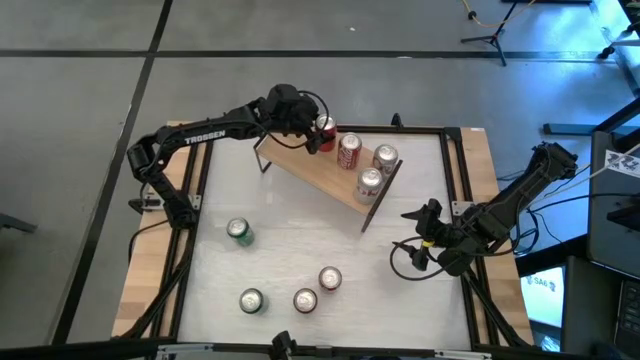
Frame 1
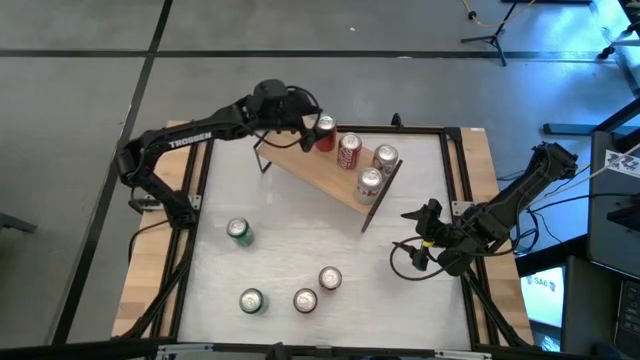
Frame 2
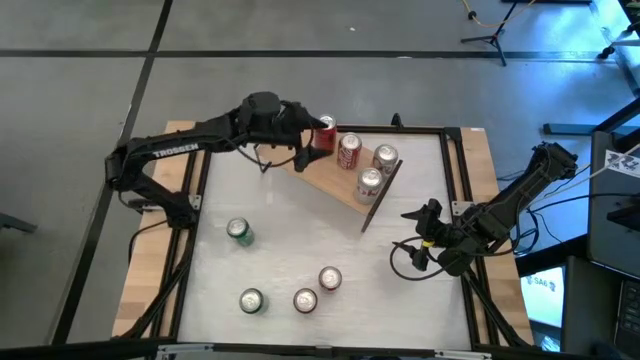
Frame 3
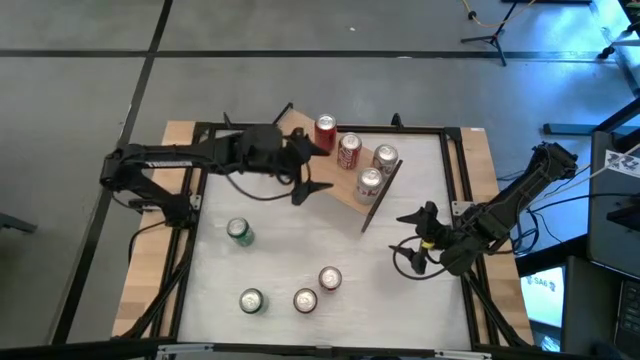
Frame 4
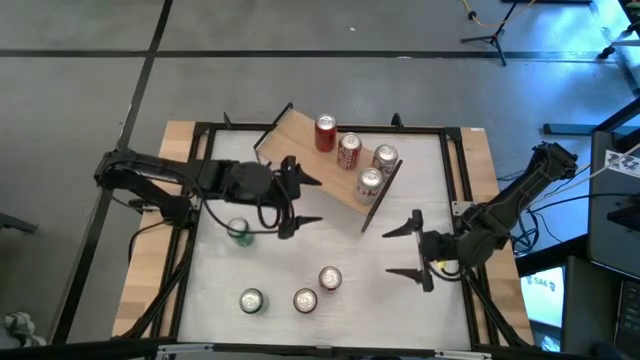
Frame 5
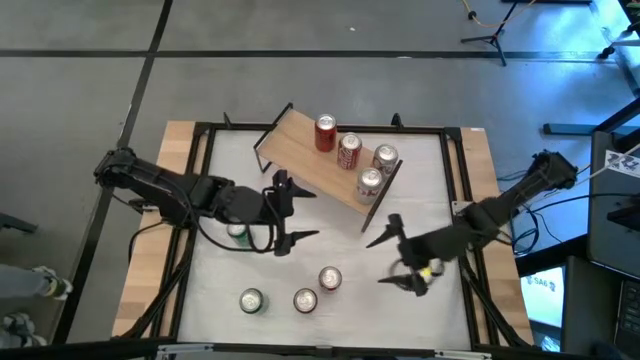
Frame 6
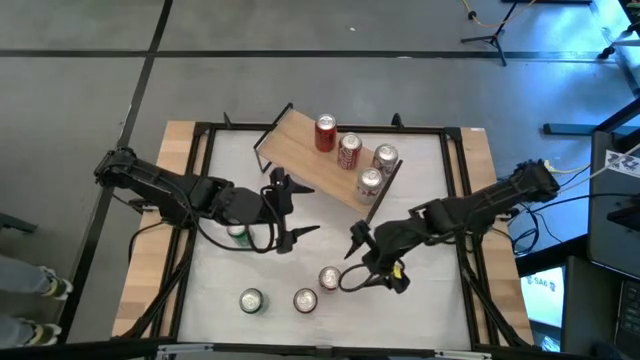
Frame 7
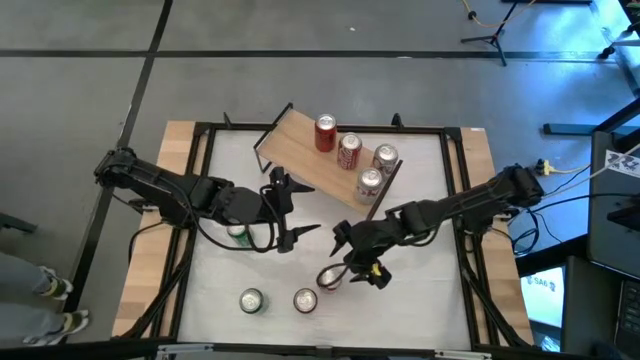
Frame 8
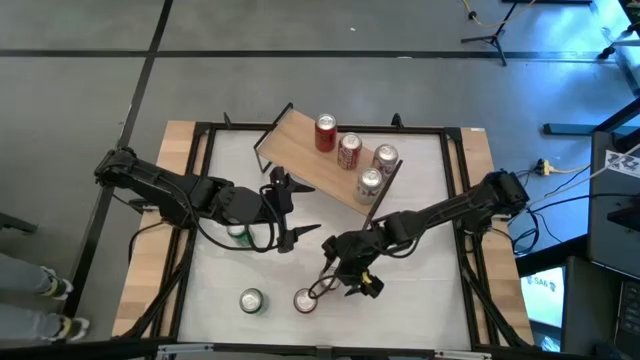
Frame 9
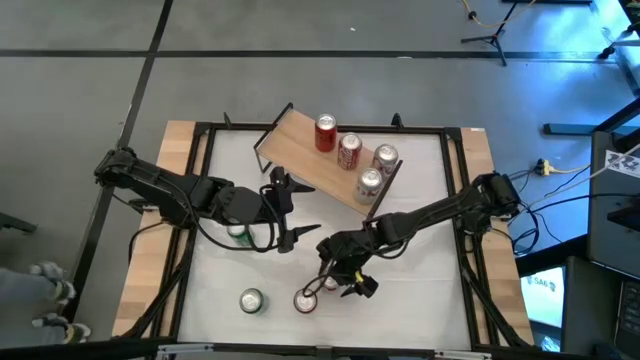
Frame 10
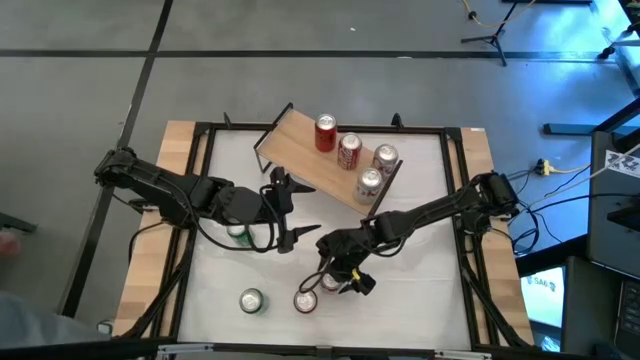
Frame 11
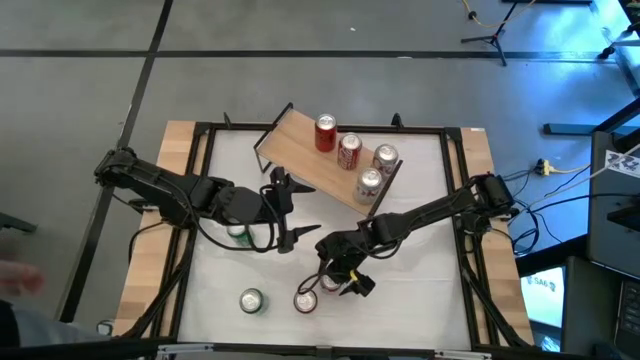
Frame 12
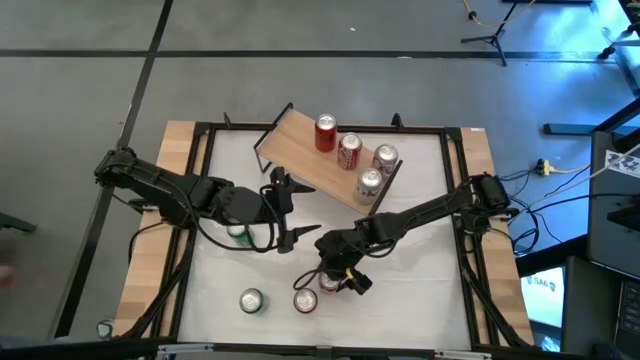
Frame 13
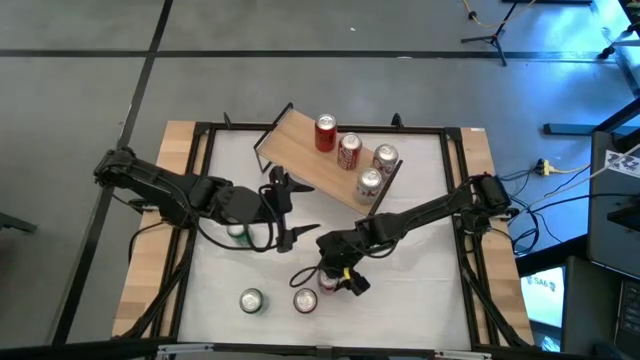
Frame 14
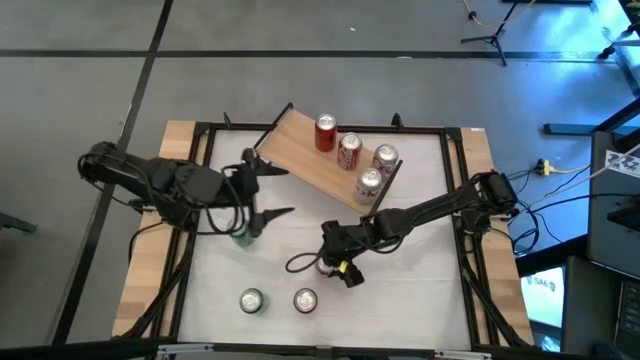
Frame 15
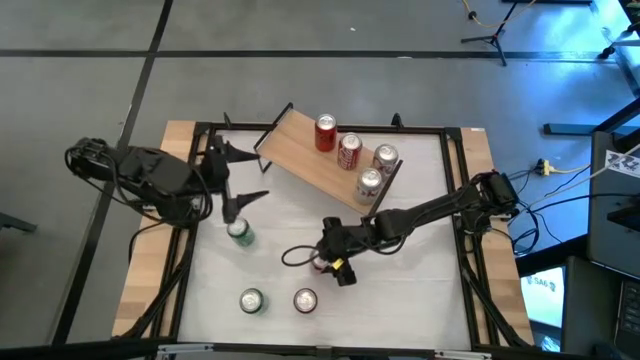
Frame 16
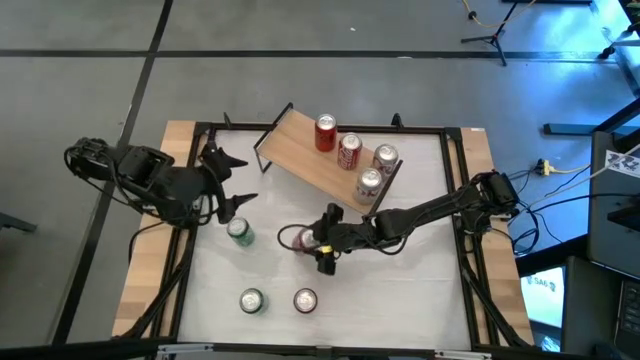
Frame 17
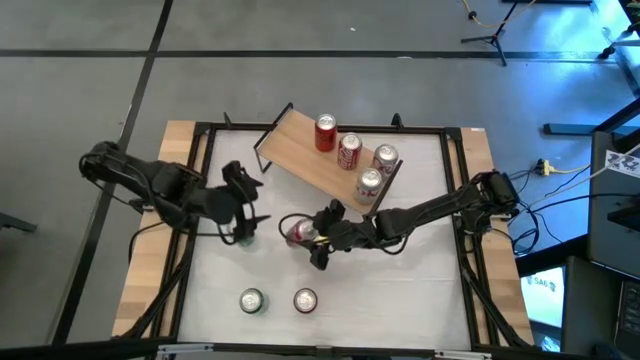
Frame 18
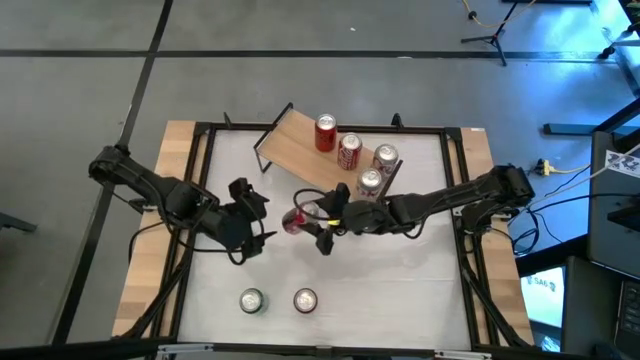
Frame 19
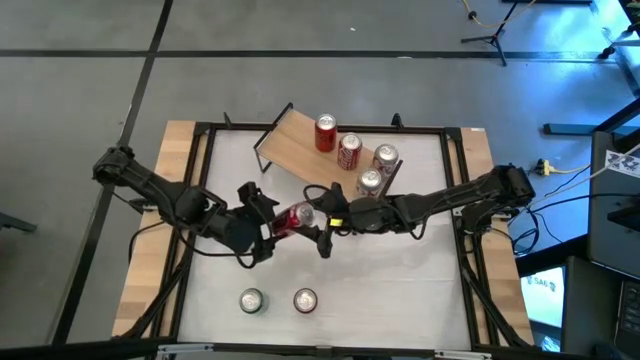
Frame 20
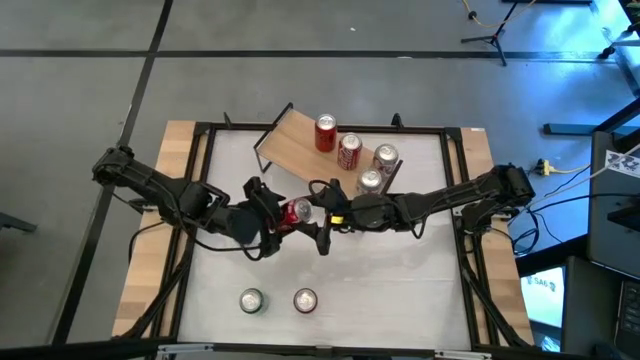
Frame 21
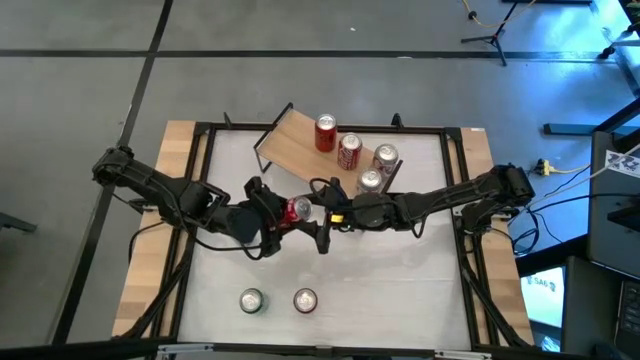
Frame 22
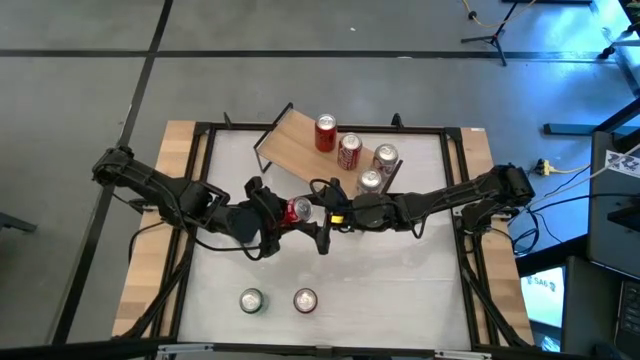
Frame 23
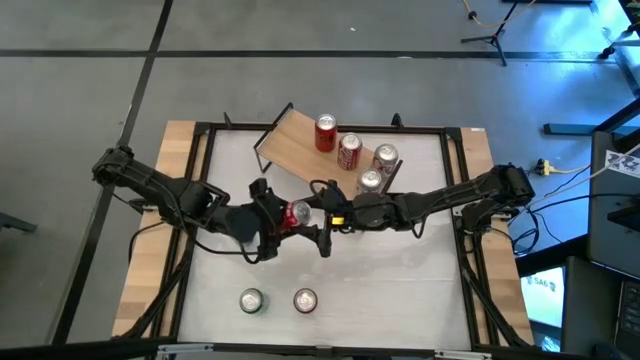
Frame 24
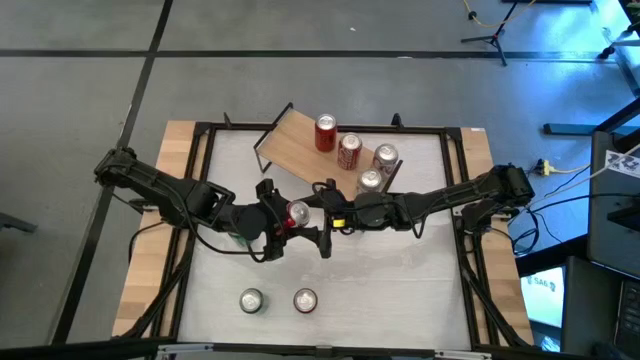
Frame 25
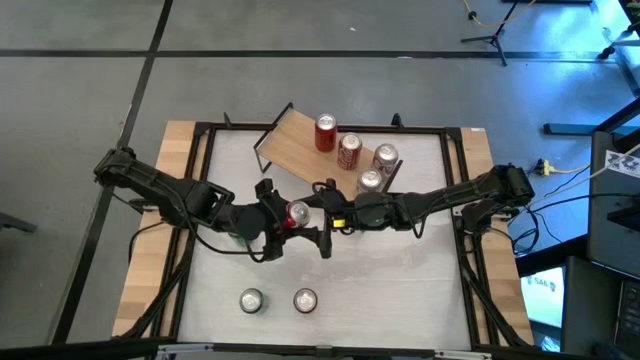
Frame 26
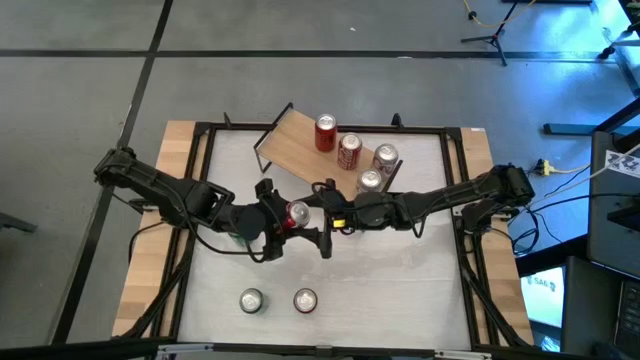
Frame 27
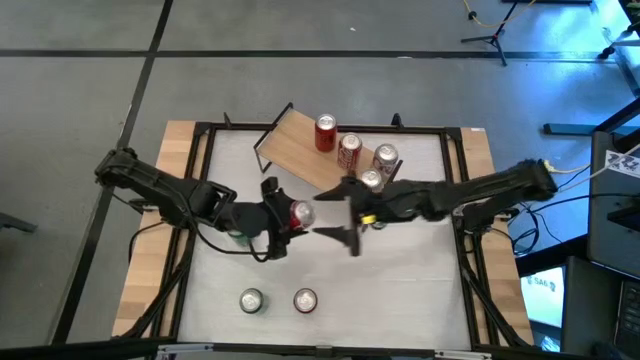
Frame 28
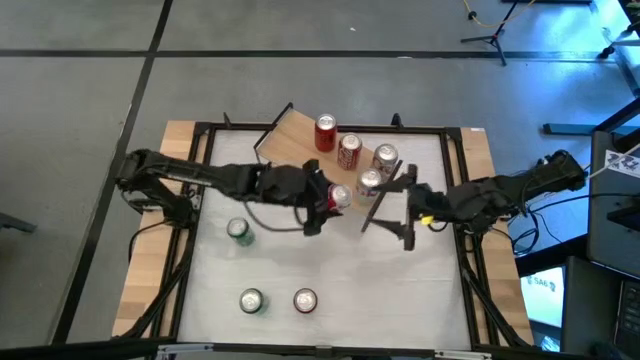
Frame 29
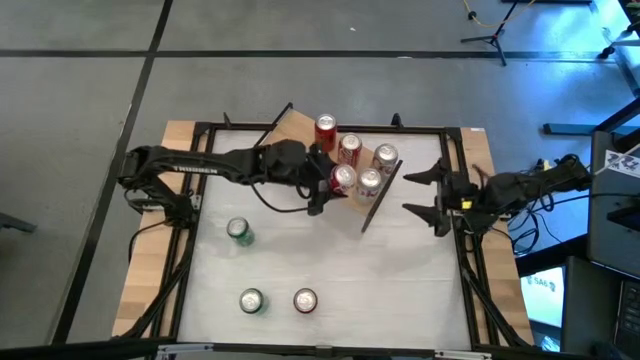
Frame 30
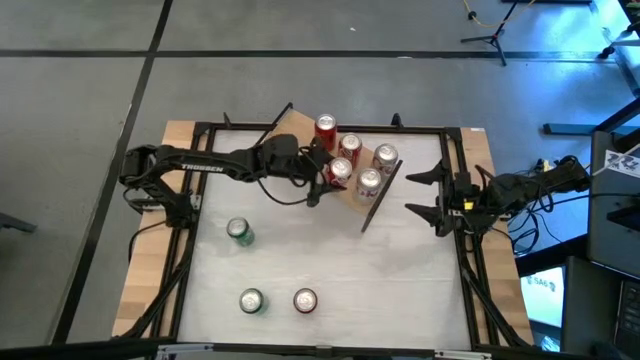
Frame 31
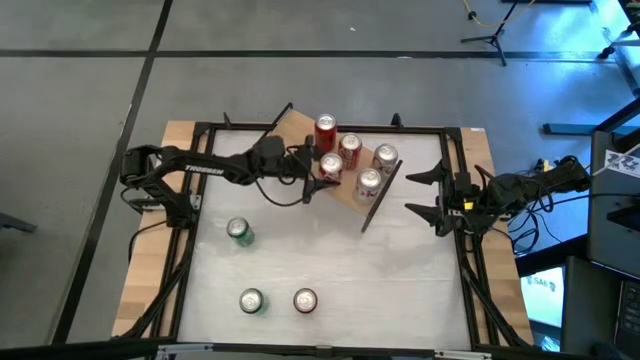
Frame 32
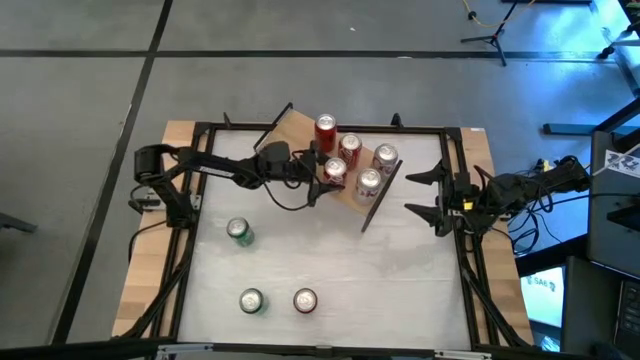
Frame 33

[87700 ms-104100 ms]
Task: Place canned beverage on shelf
Put the red-white soda can on the shelf aligned with the other red-white soda cans
